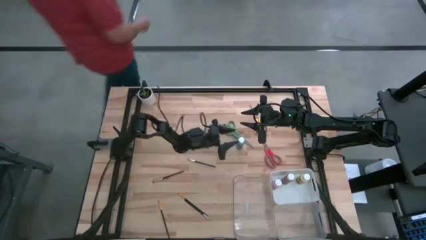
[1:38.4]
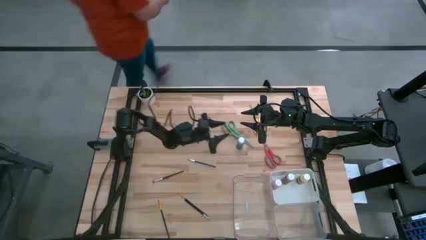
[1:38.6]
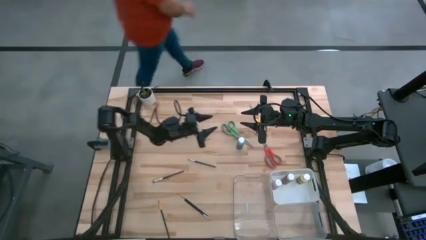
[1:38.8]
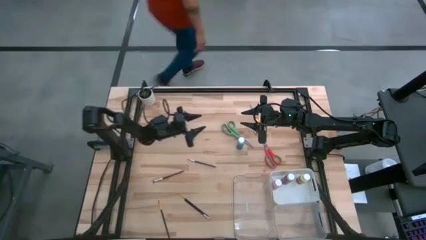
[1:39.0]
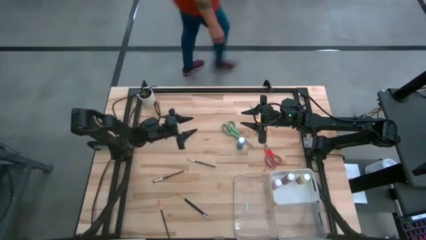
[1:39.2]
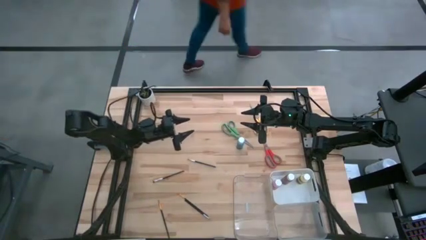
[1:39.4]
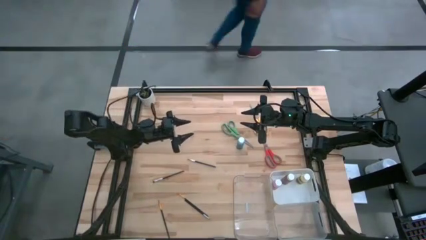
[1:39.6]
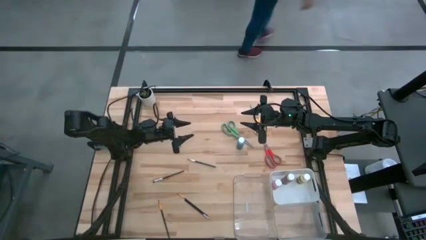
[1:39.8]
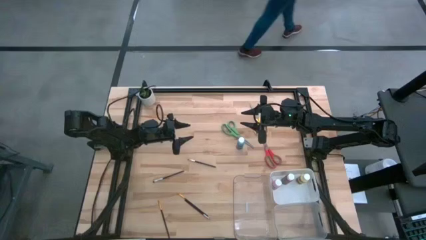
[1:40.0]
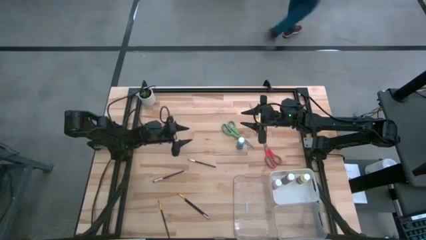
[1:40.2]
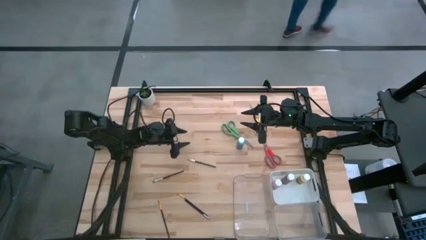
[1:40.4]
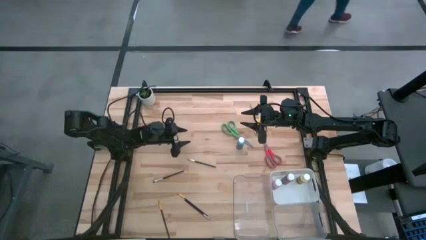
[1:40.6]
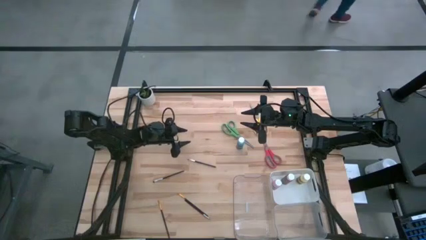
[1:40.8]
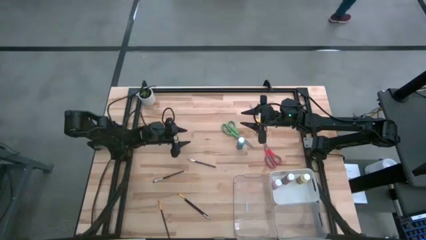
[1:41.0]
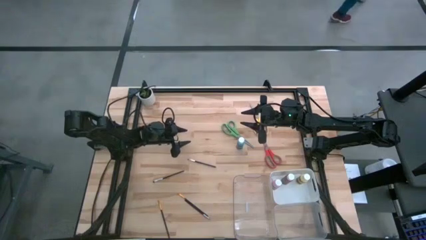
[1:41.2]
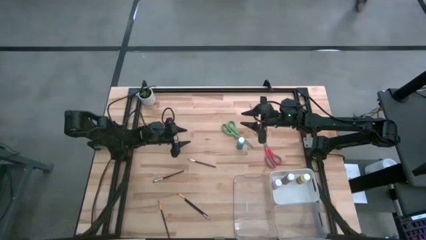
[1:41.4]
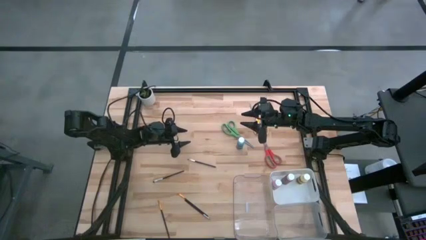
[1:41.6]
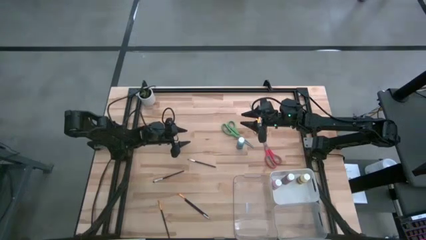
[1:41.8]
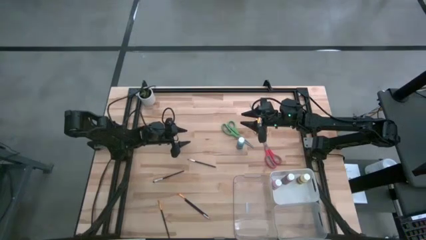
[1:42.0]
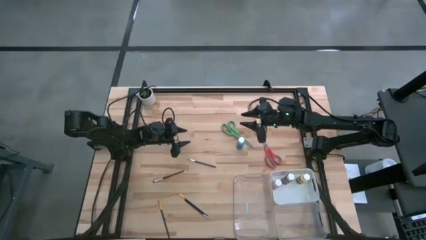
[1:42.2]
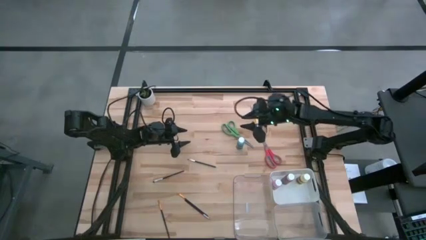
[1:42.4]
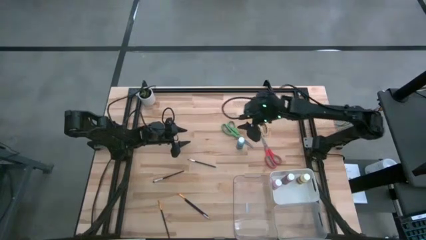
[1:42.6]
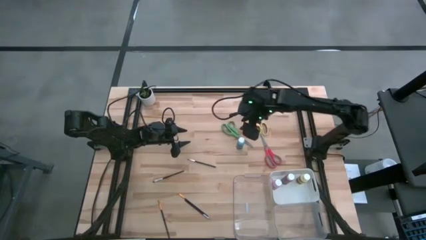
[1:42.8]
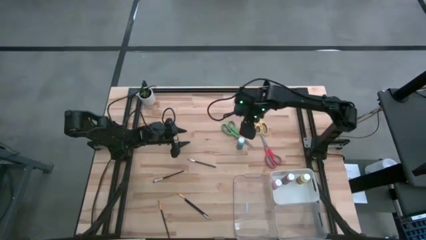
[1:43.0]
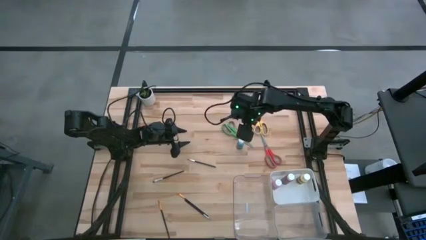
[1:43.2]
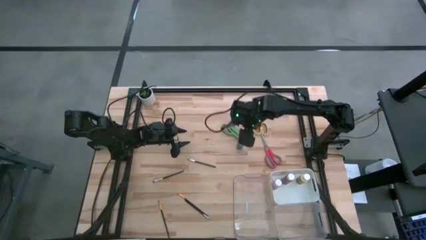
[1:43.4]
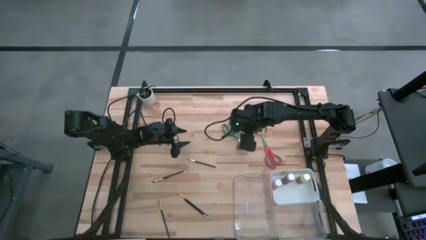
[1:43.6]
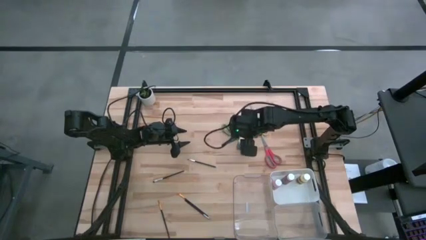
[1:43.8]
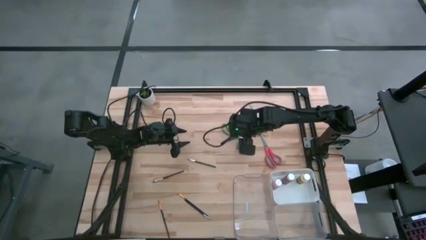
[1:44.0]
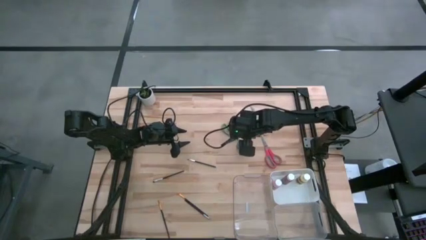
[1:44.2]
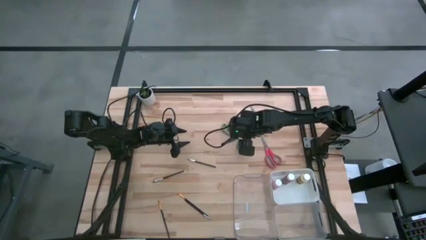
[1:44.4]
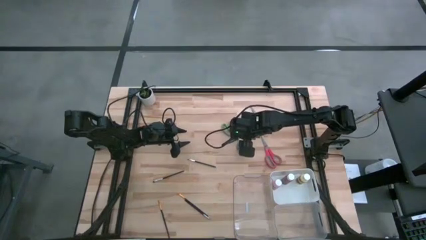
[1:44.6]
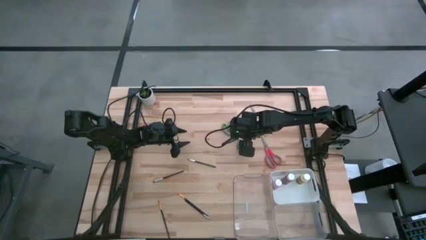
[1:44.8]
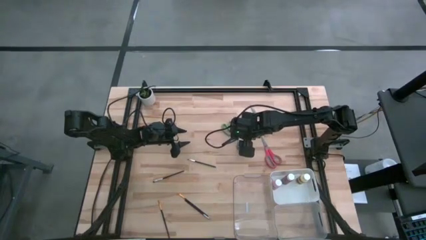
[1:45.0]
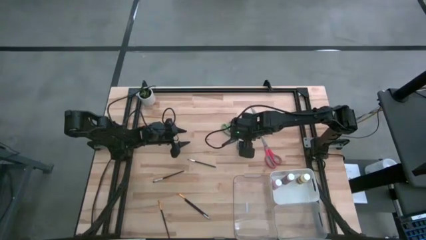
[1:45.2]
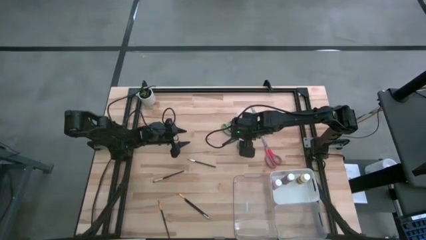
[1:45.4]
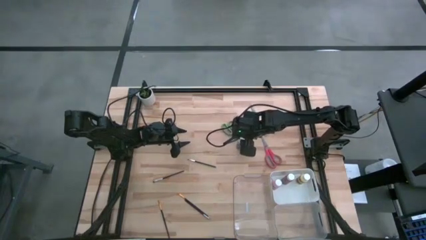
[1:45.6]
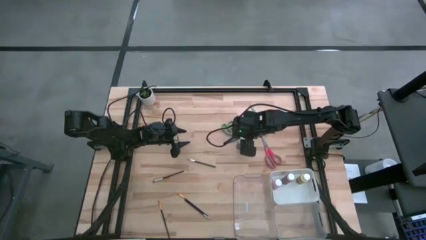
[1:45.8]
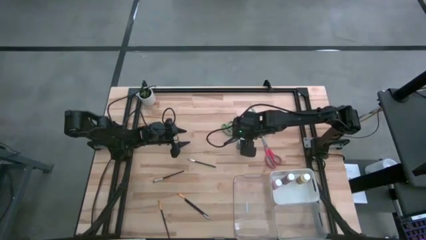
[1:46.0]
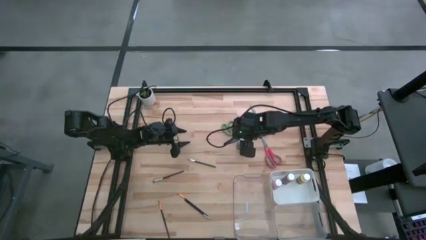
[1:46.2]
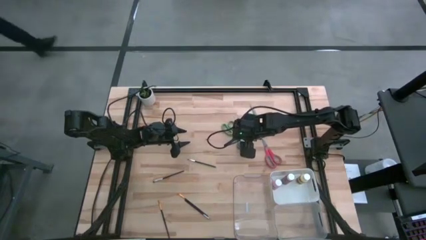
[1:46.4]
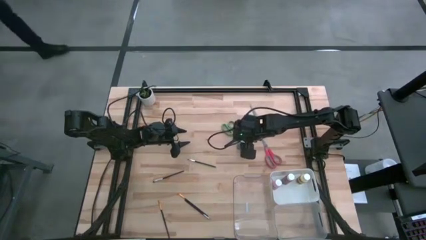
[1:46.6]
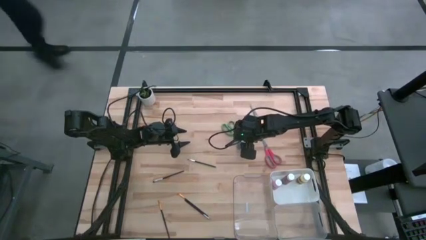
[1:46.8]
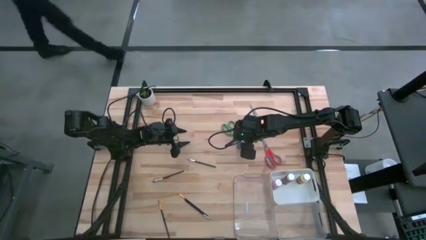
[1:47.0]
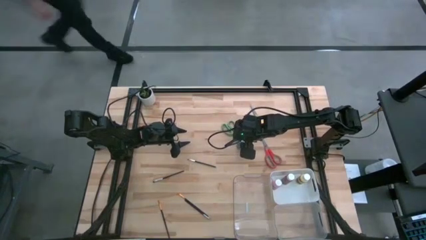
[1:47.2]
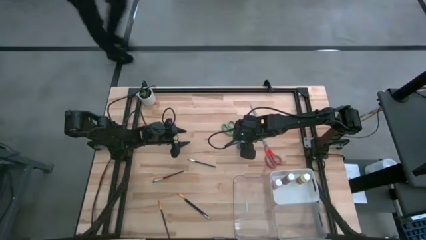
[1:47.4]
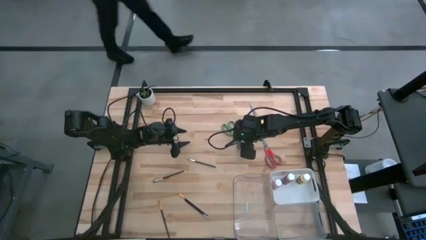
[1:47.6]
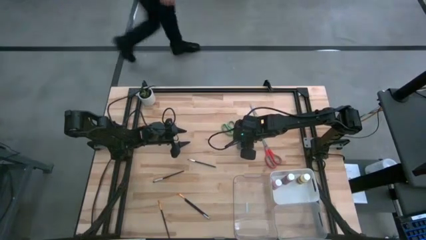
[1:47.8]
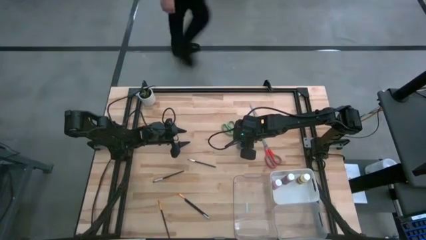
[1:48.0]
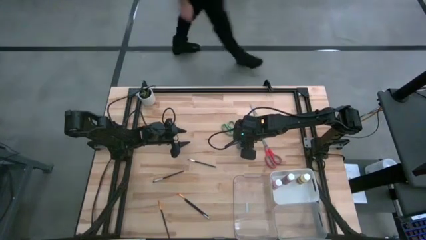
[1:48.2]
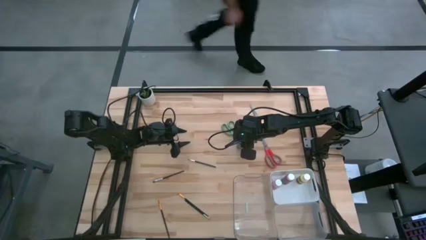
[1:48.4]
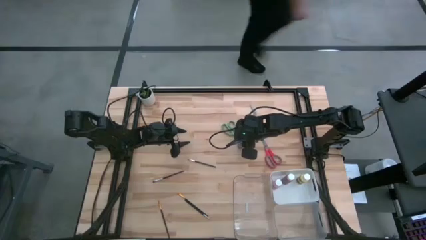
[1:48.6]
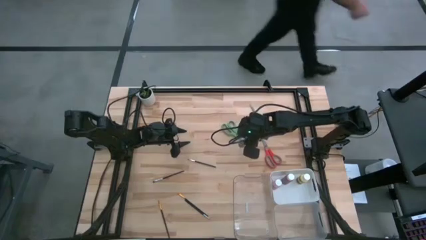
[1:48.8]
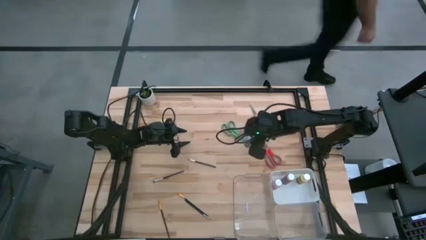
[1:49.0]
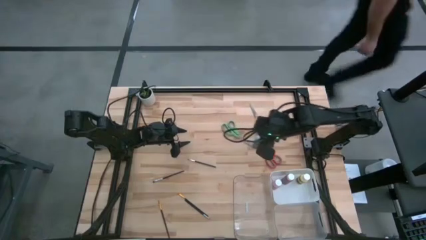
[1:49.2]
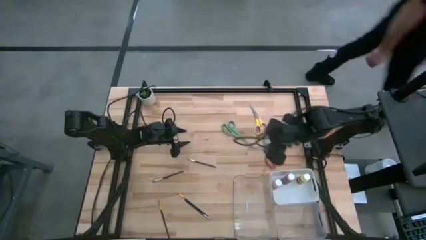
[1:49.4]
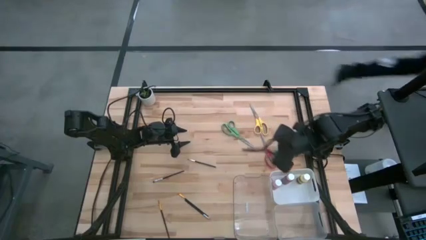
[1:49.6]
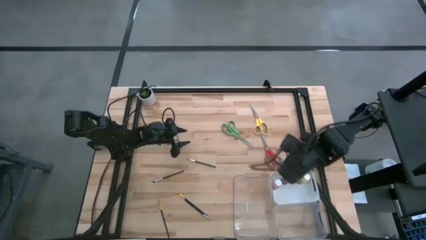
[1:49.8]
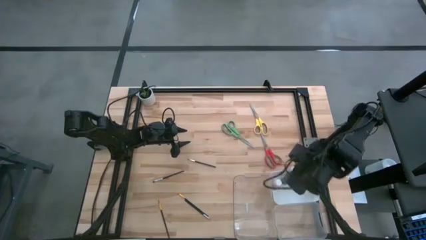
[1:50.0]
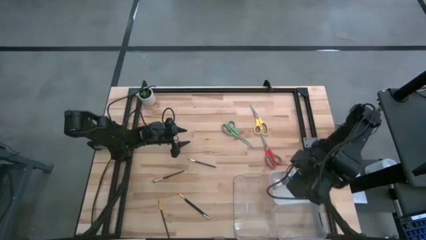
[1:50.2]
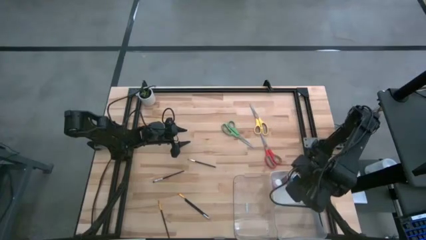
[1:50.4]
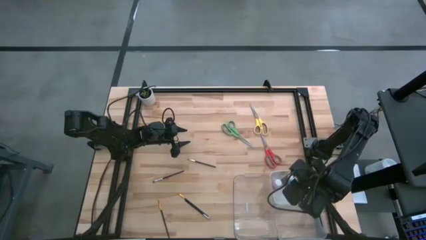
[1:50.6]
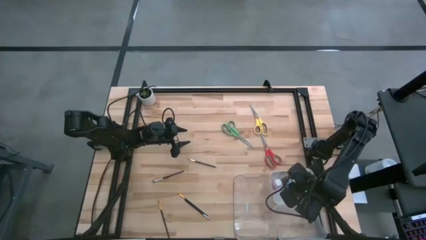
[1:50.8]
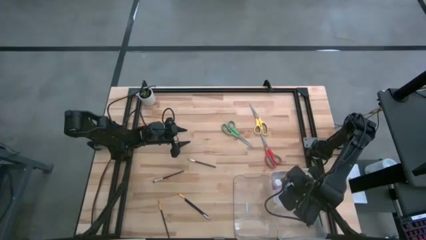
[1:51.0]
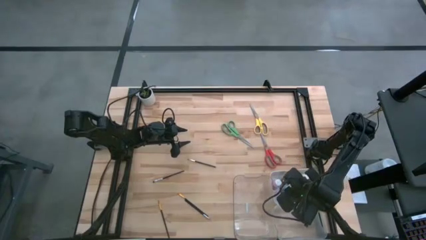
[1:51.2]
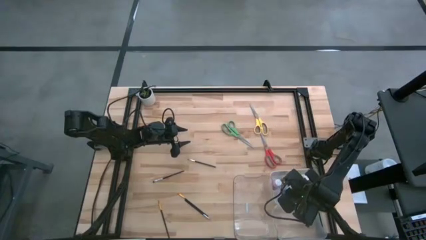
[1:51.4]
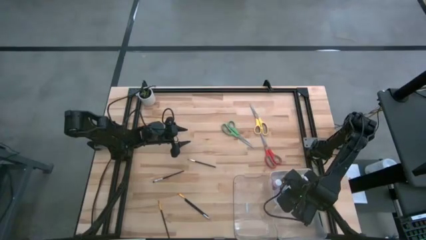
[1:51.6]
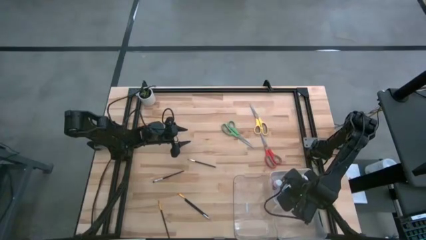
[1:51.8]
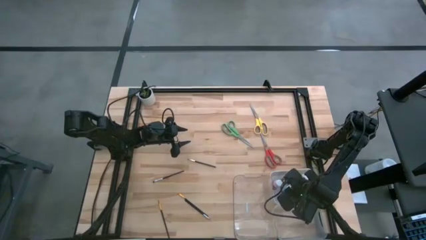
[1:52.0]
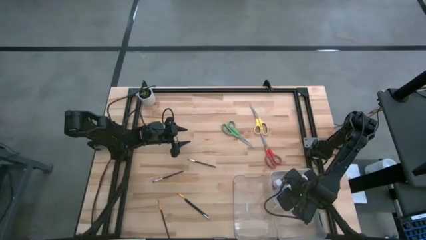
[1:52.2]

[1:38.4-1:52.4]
Task: Pick & Place Paint Supplies
Put the blue paint bottle into the white bin

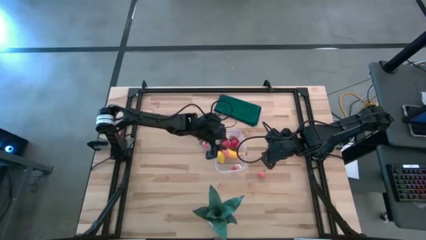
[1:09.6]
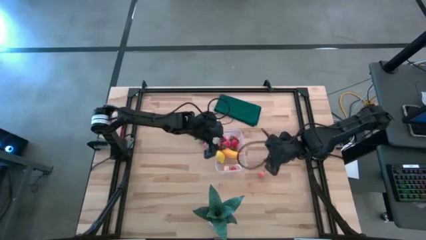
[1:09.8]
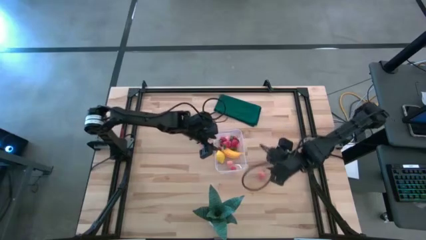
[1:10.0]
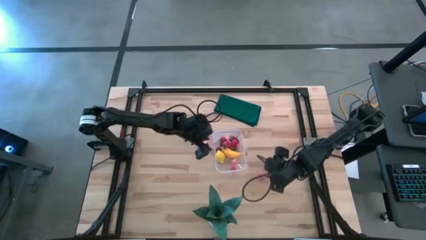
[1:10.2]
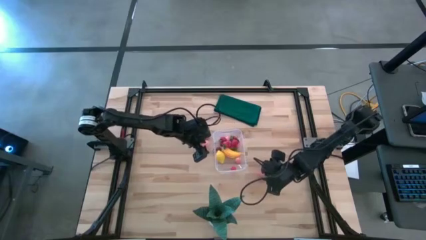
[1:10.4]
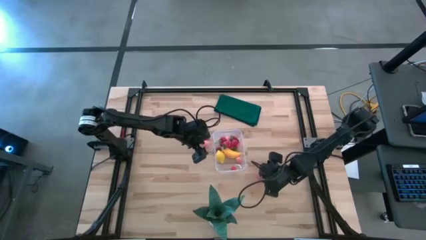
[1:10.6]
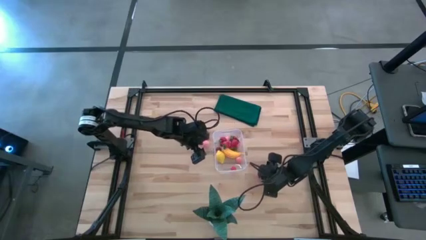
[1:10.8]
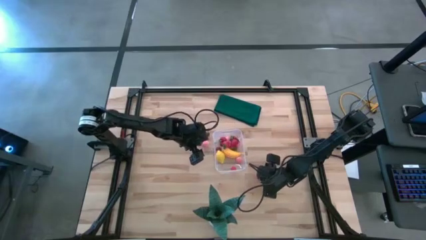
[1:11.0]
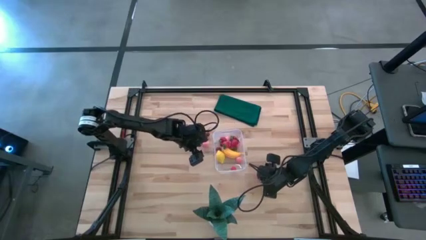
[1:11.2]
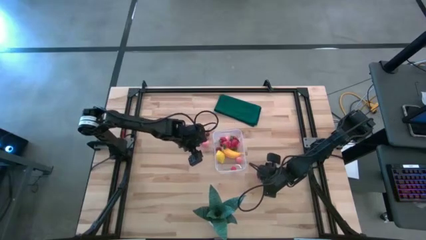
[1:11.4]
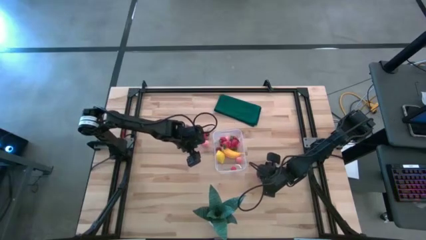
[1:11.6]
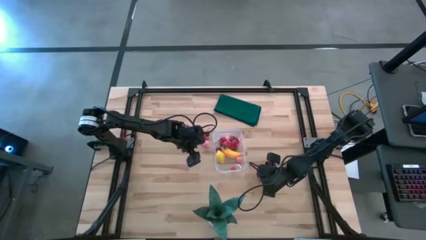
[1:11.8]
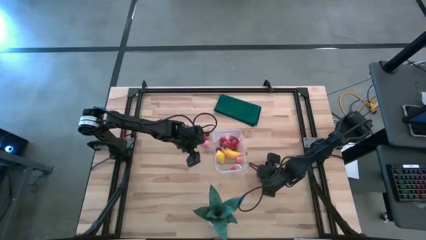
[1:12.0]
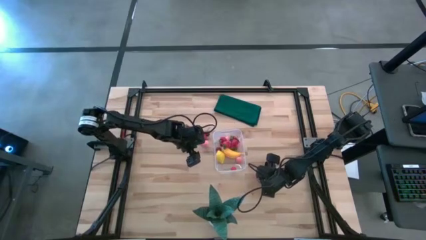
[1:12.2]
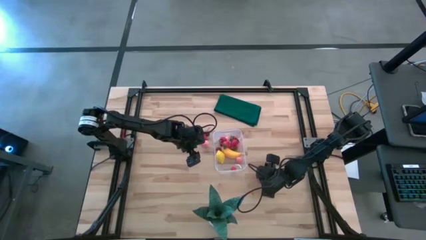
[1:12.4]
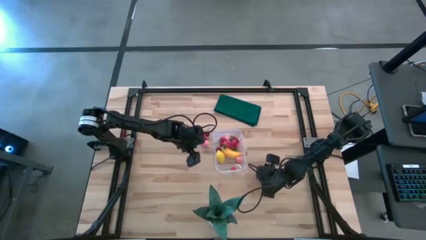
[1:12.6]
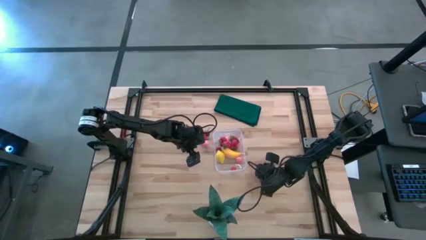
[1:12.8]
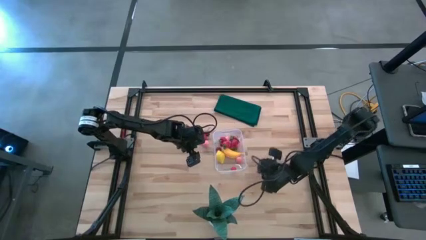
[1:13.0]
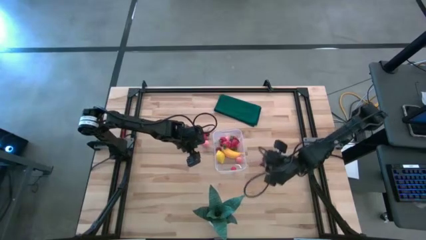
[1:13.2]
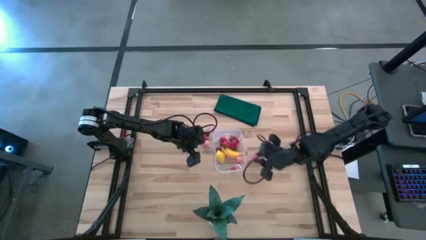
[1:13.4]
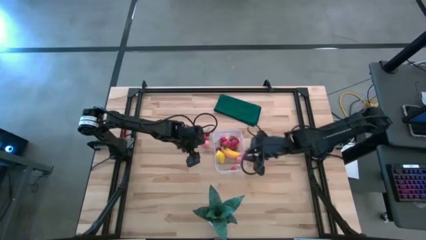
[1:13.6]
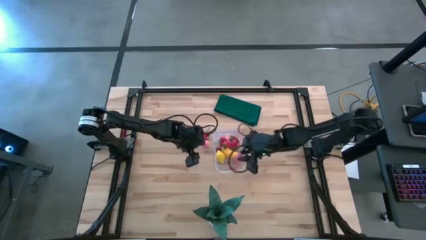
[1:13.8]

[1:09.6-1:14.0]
Task: Pick and placing Produce into tupperware
Put the peach into the transparent bin
